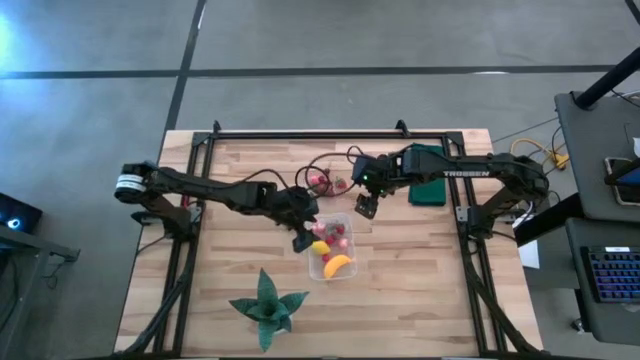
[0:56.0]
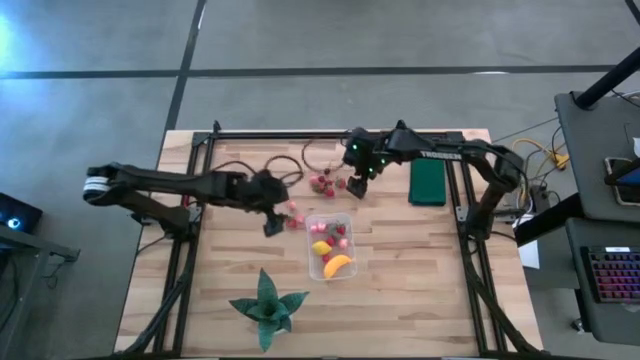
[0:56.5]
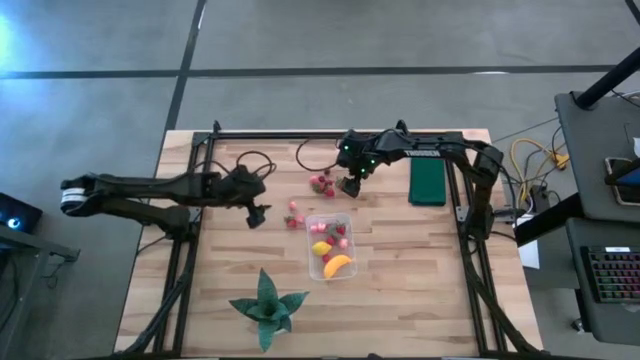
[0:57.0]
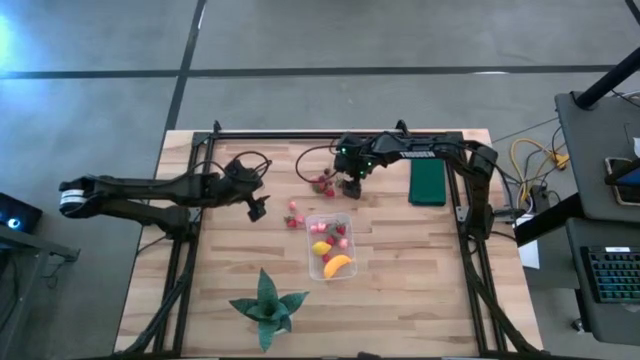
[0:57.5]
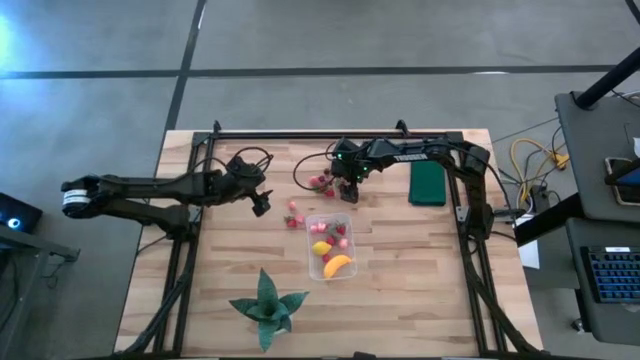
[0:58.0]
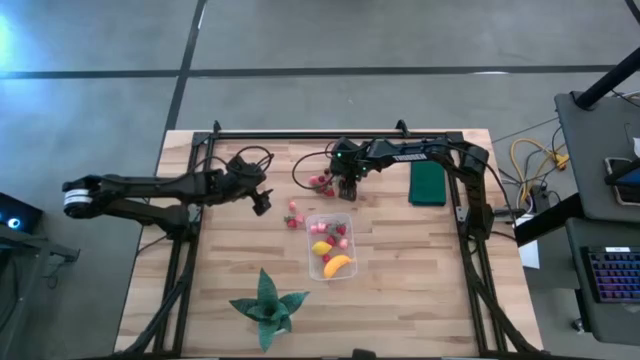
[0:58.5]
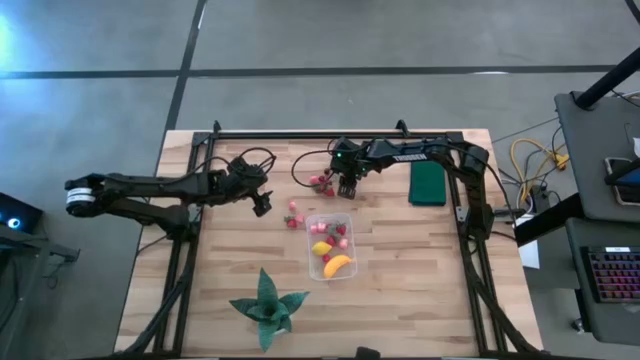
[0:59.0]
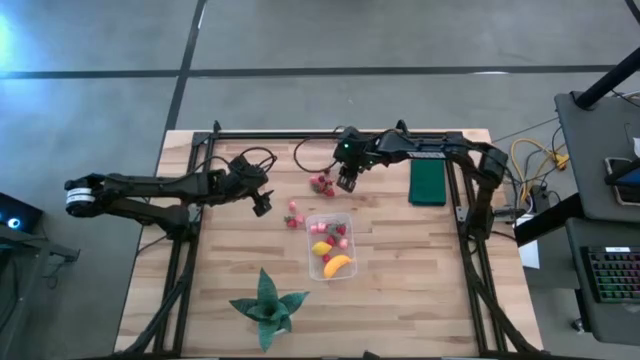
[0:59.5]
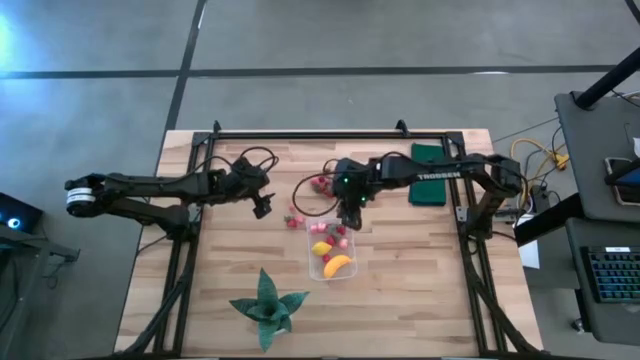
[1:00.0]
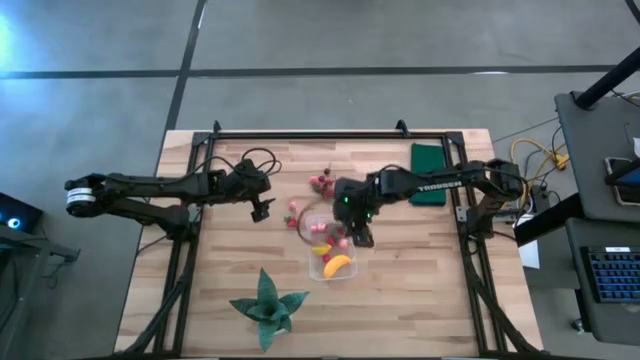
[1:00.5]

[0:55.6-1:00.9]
Task: Pick and placing Produce into tupperware
Put the strawberry into the transparent bin

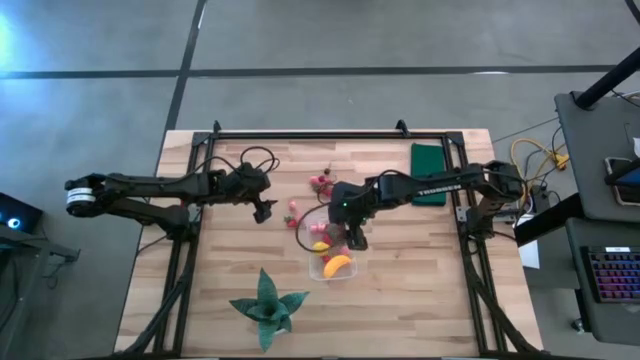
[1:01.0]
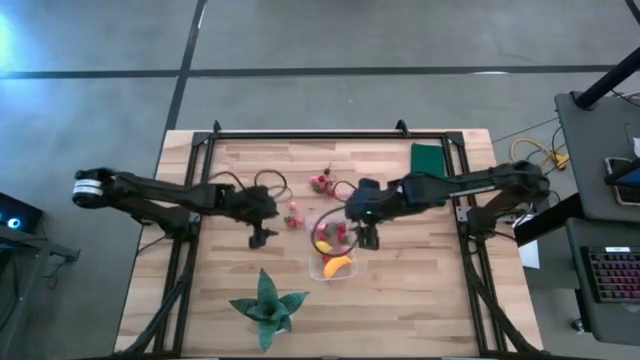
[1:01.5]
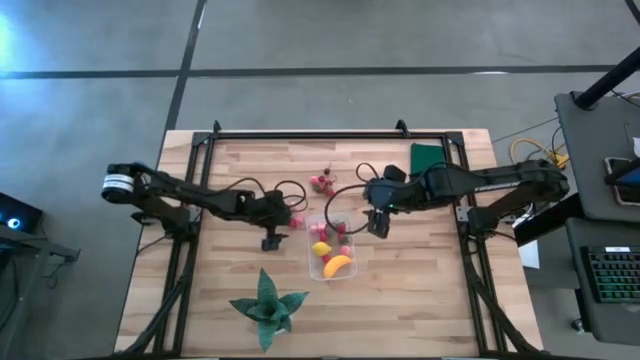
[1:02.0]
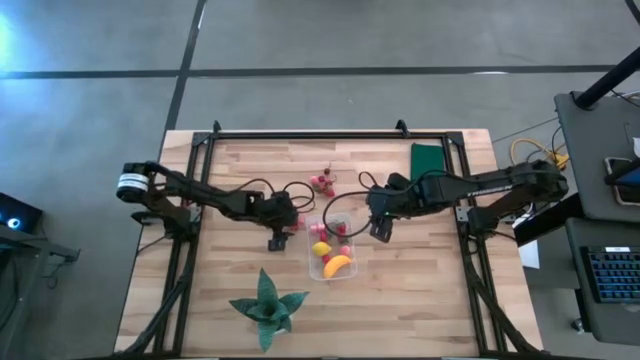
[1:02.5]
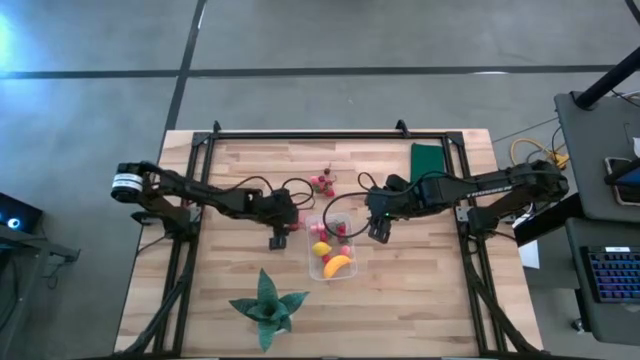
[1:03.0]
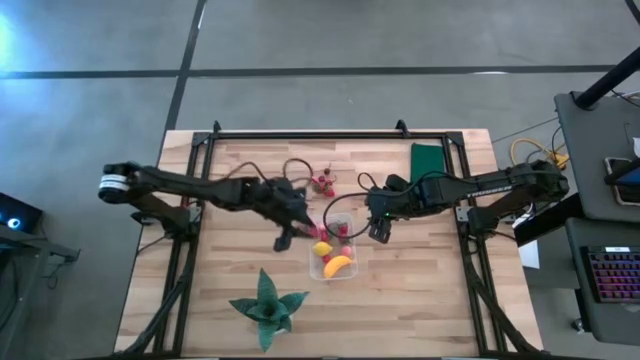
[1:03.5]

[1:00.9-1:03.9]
Put the strawberry into the transparent bin

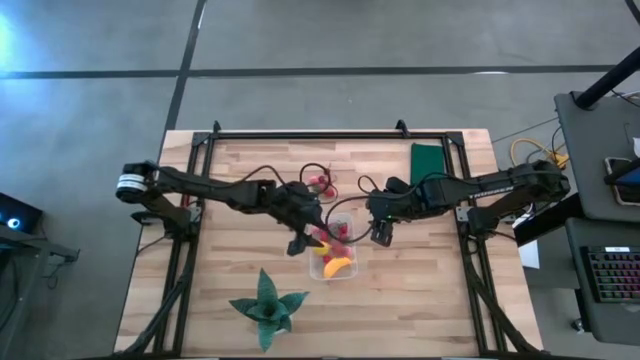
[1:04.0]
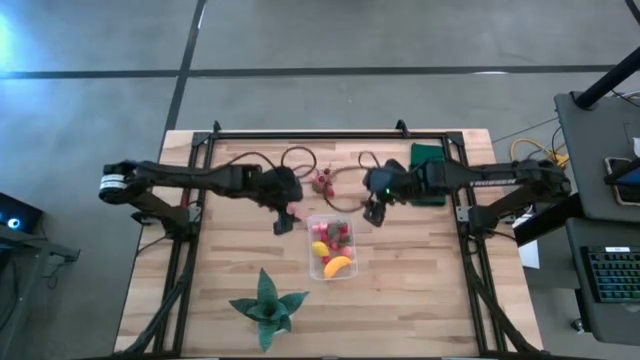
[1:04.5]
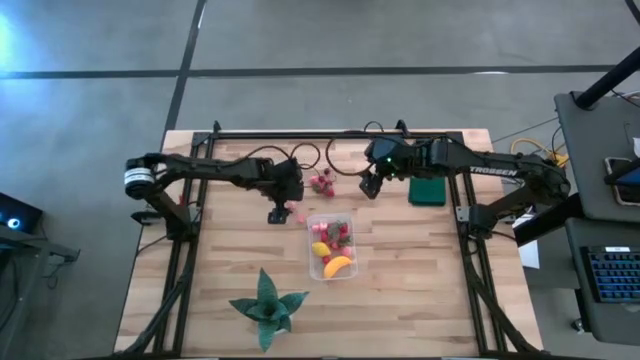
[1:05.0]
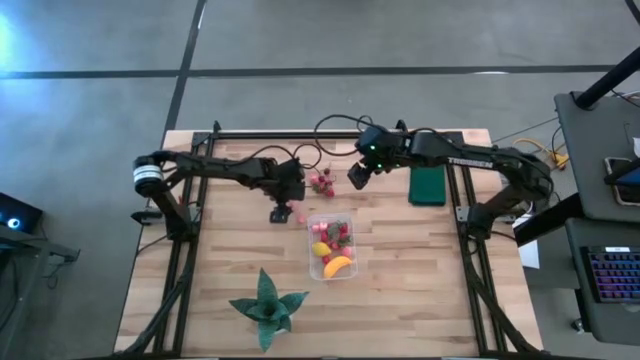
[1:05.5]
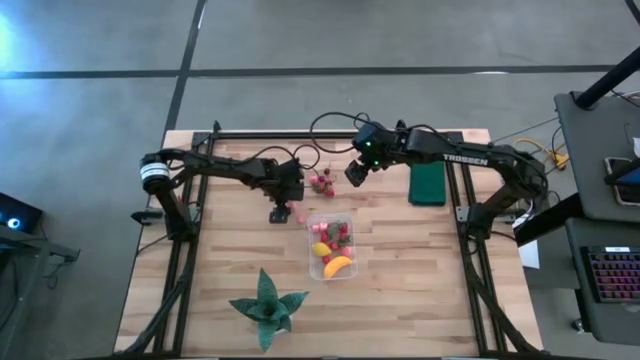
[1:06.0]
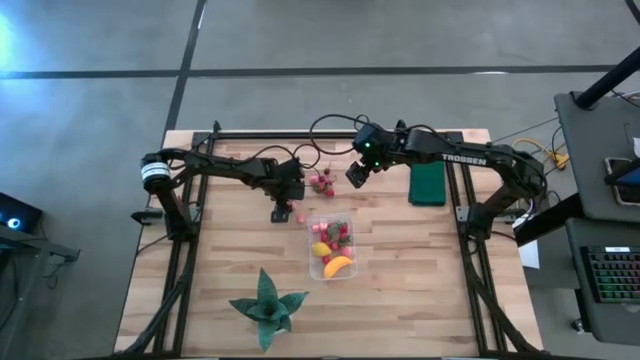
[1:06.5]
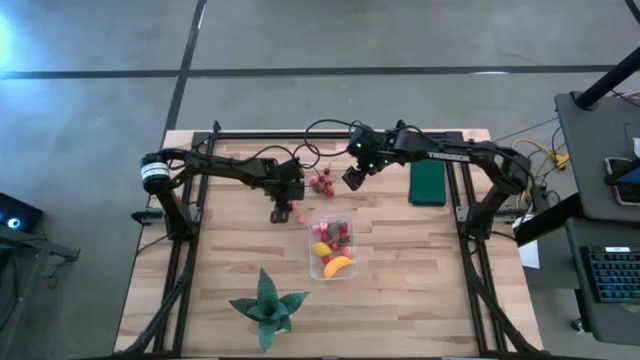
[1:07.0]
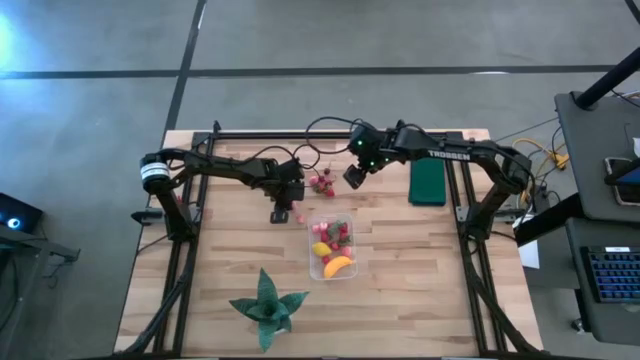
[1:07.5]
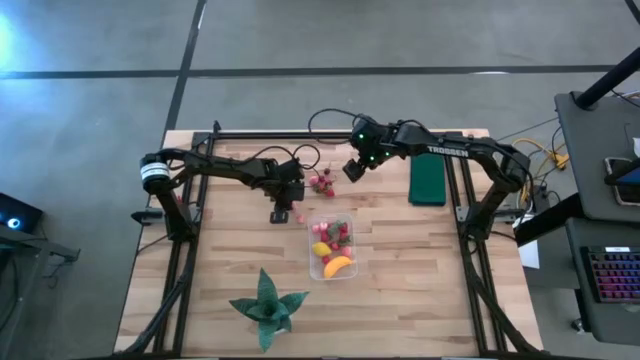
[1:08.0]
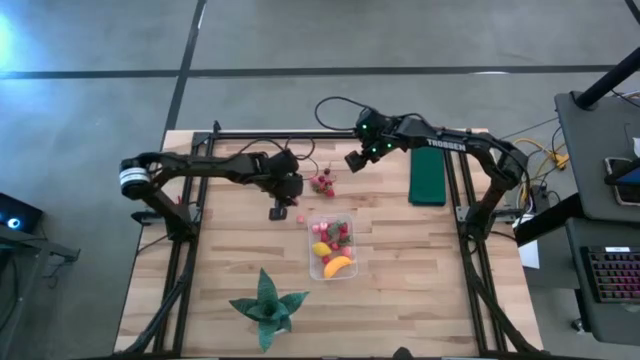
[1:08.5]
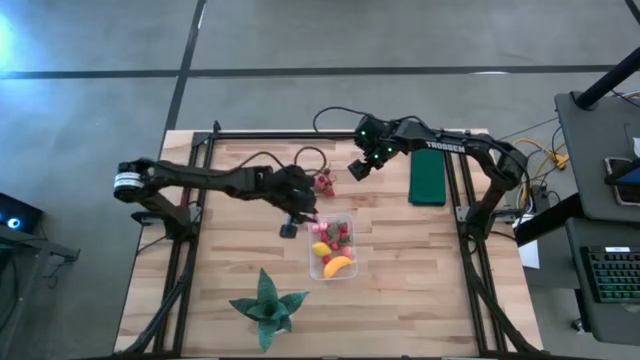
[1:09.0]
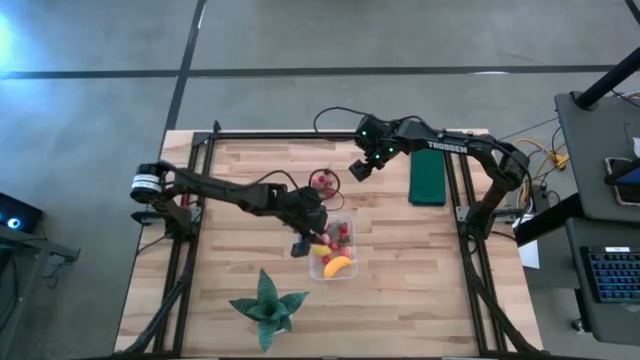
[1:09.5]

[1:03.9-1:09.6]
Put the apricot into the transparent bin

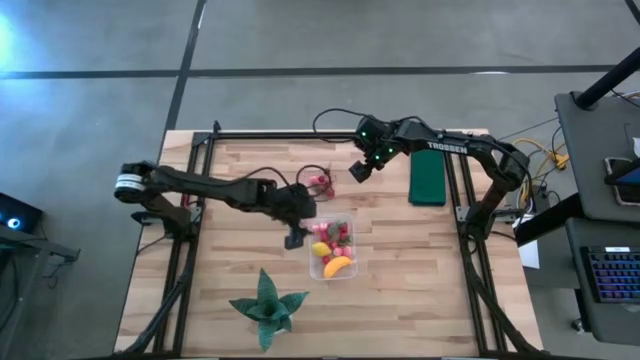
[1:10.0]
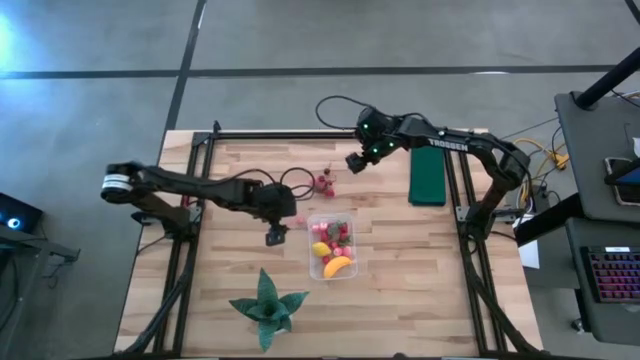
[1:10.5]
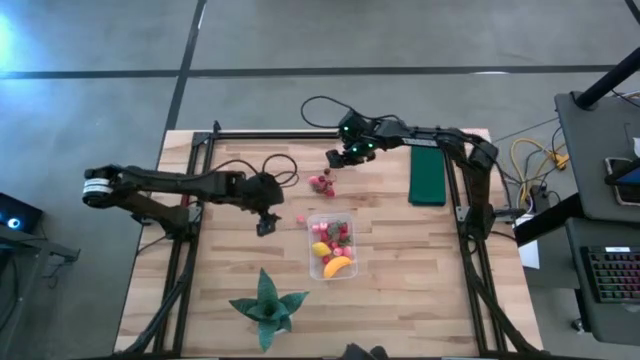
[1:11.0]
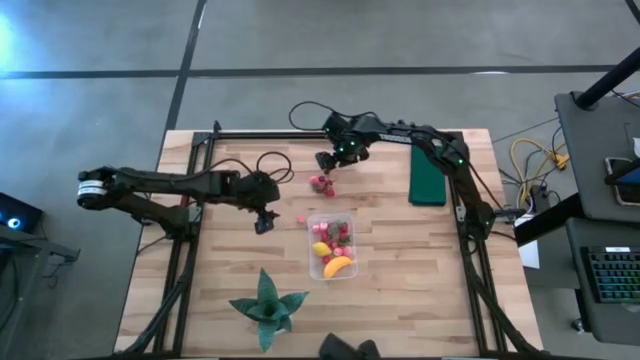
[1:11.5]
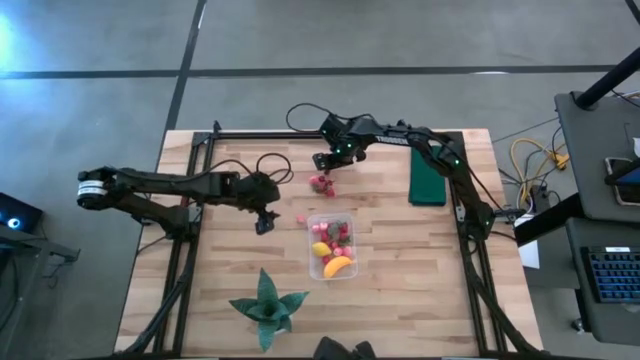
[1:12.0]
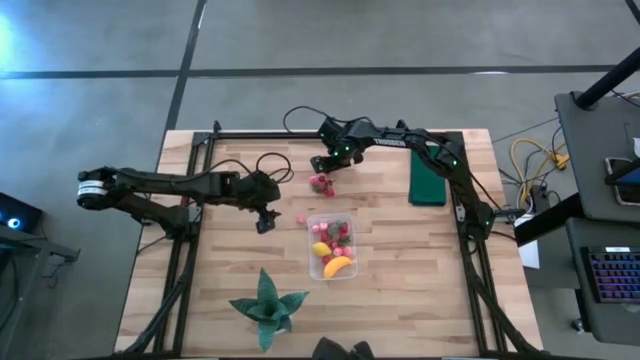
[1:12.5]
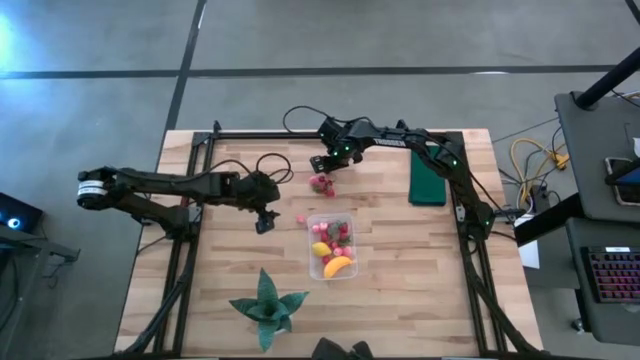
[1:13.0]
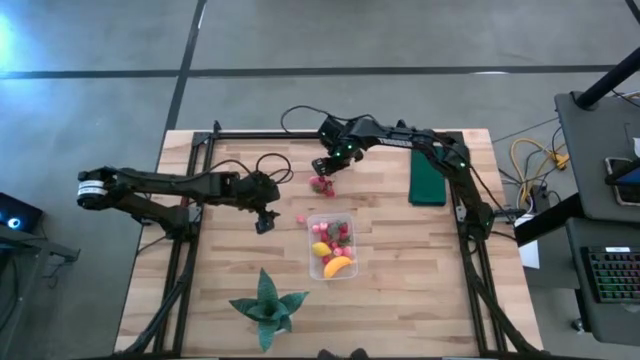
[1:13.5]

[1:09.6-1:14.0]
Put the cherry into the transparent bin

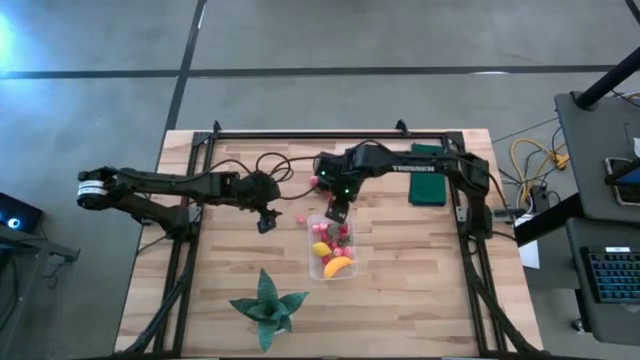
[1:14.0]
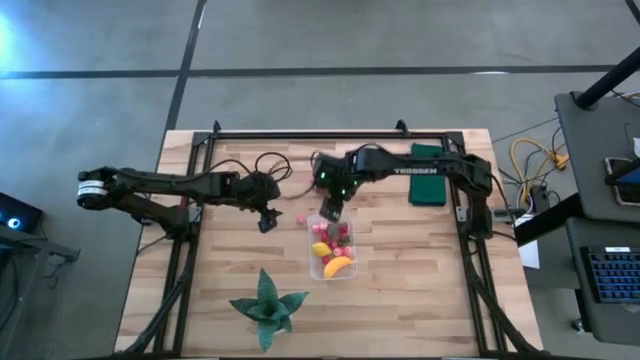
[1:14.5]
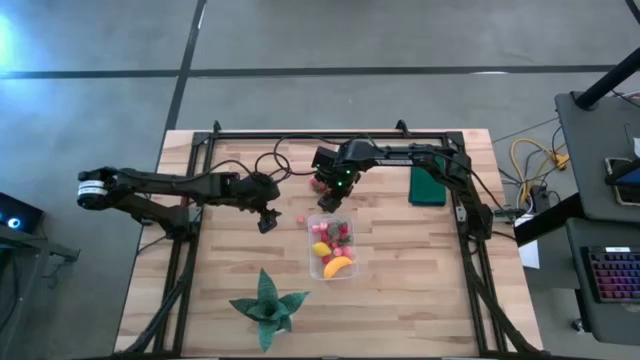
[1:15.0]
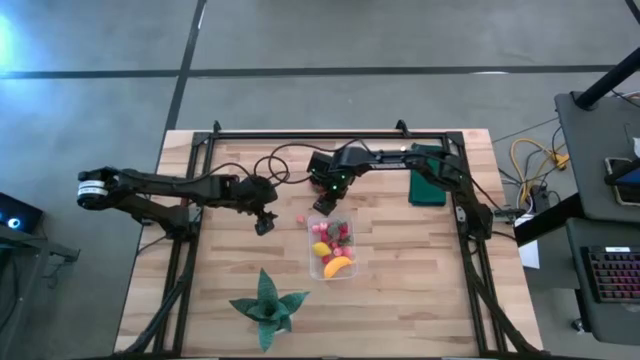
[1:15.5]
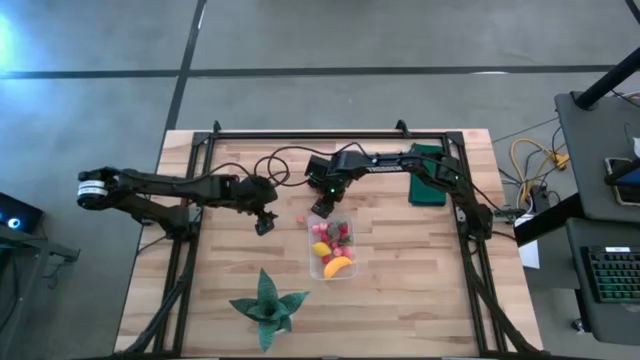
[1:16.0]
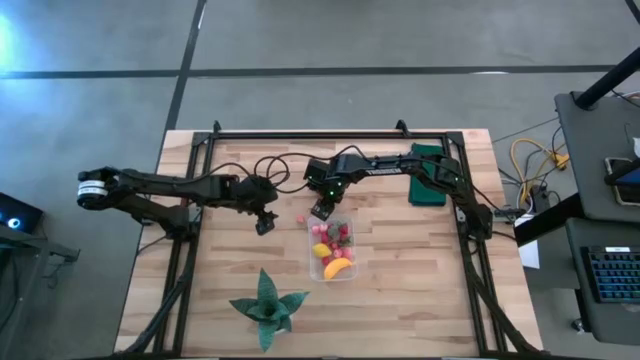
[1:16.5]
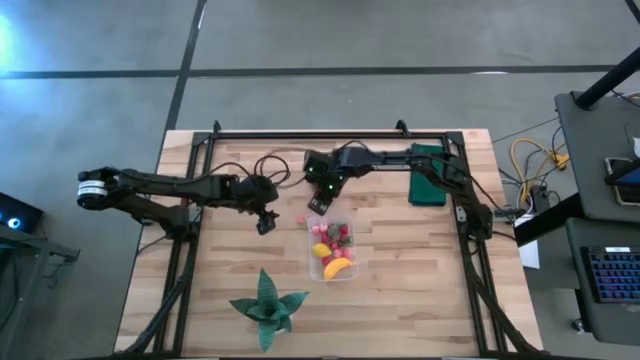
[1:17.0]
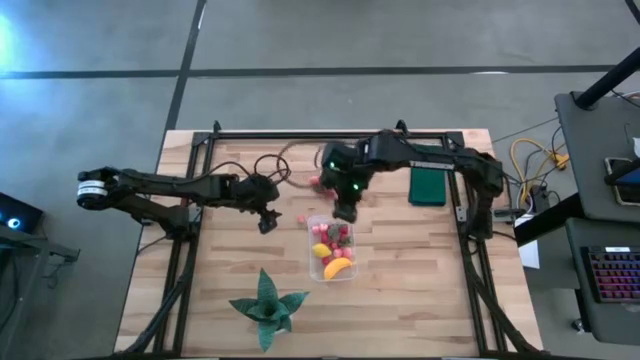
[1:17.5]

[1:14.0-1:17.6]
Put the cherry into the transparent bin
